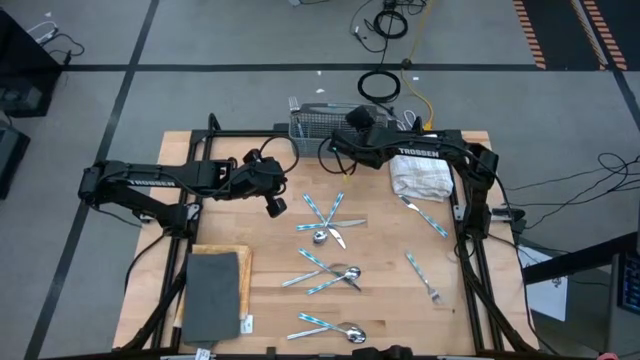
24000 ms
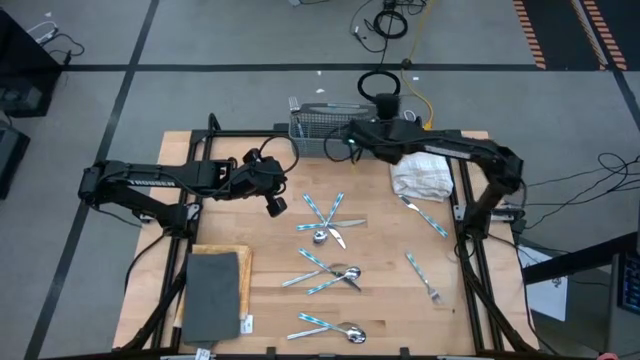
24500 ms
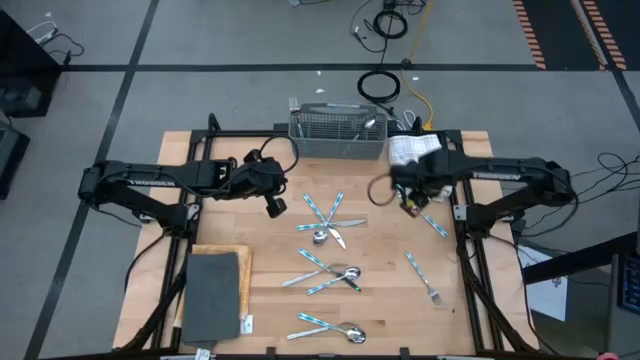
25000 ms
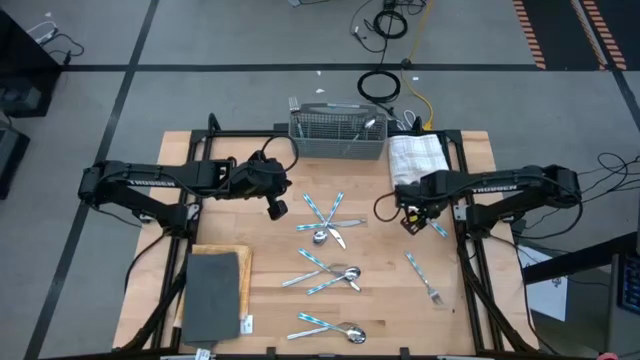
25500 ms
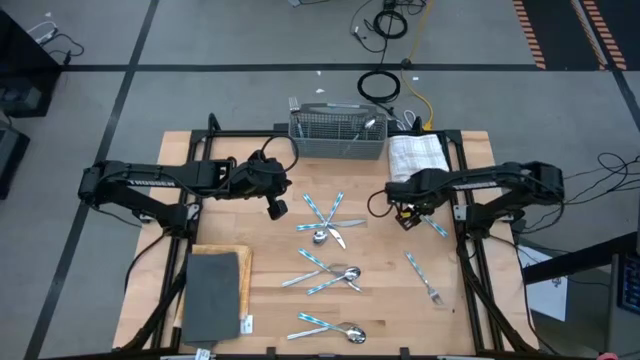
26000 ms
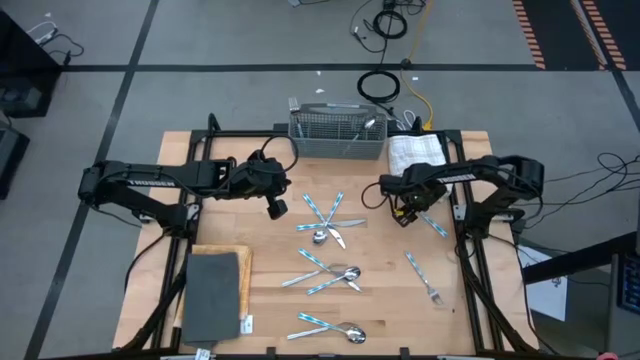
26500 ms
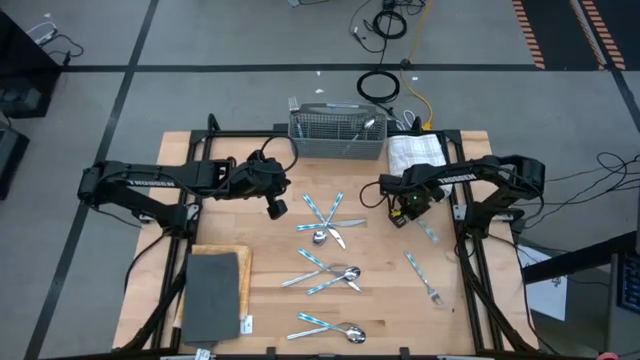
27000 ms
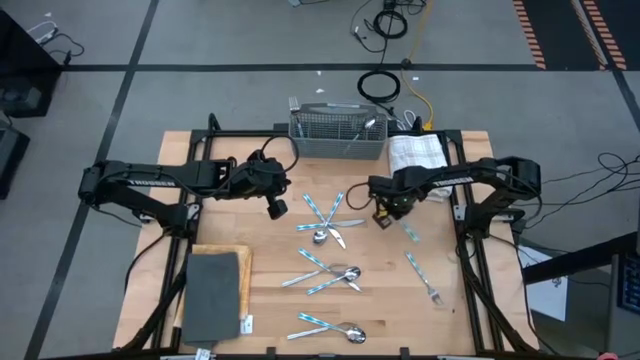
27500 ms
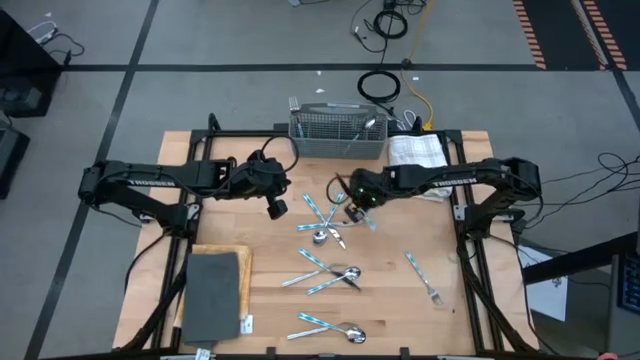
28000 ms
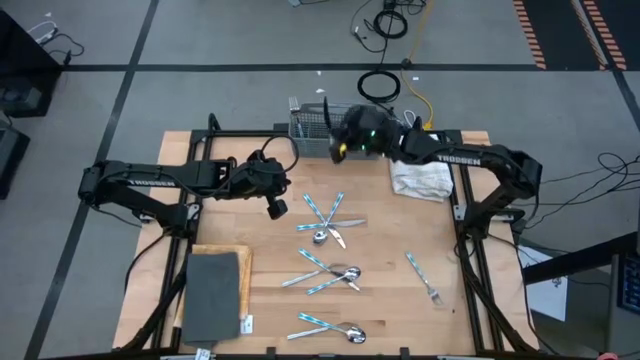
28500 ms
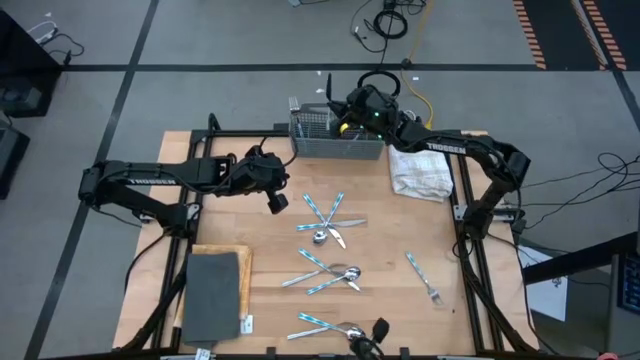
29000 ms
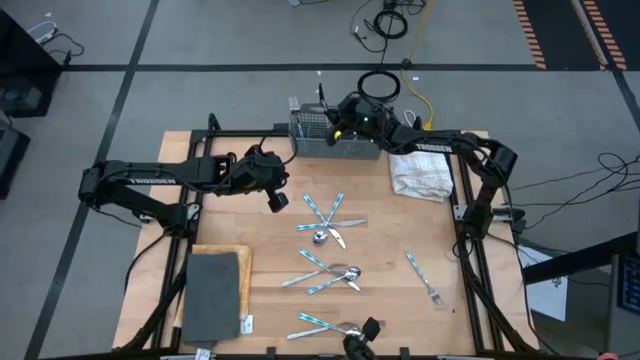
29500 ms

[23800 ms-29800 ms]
Task: Sort silverware
Put the knife into the silverware basket

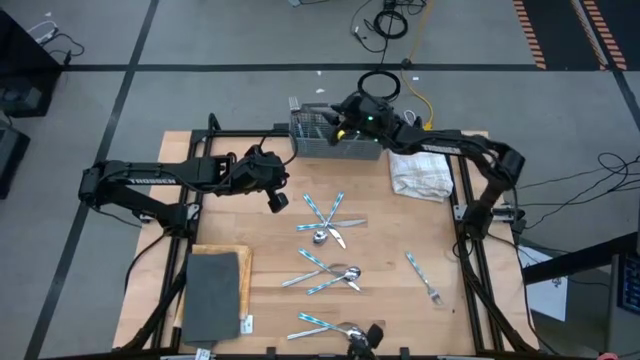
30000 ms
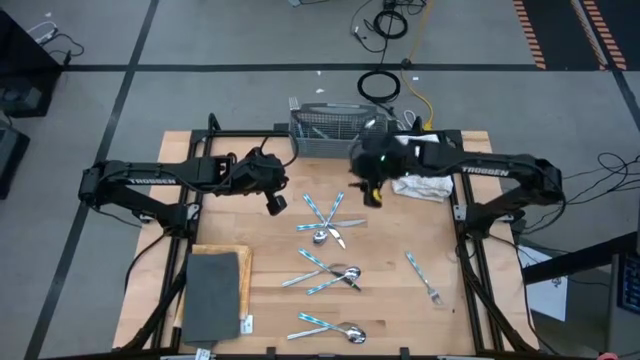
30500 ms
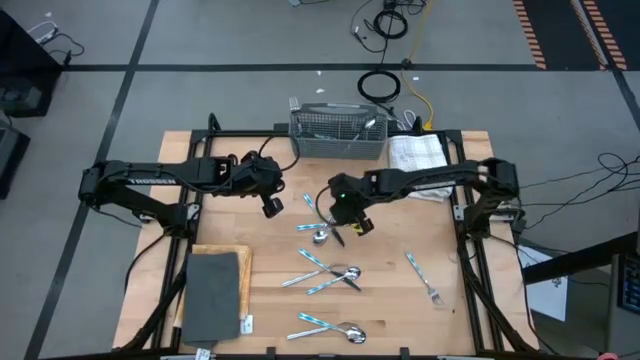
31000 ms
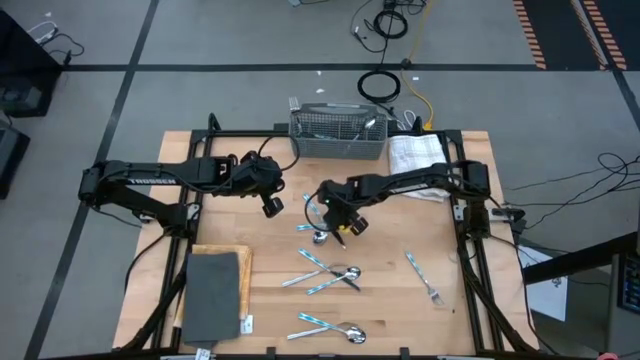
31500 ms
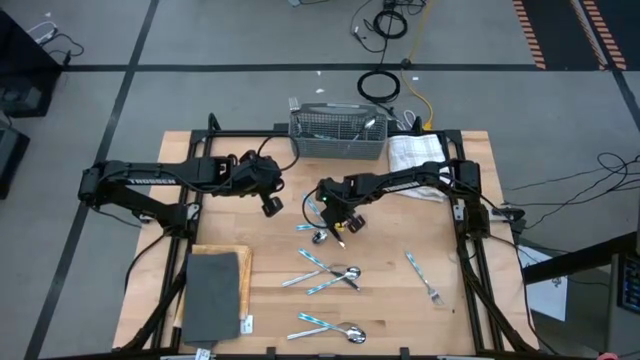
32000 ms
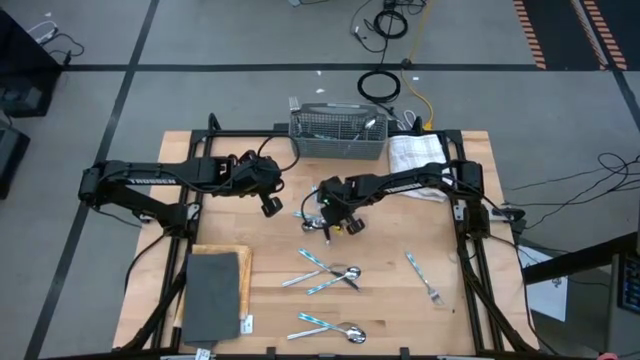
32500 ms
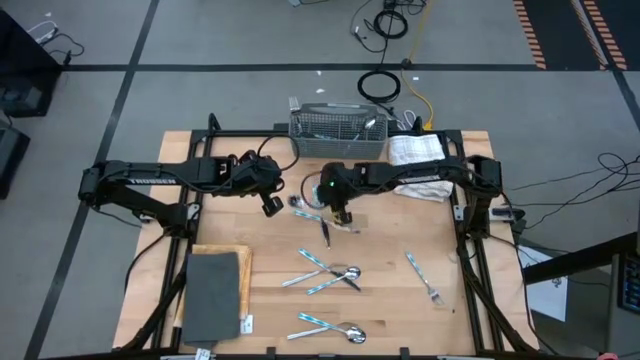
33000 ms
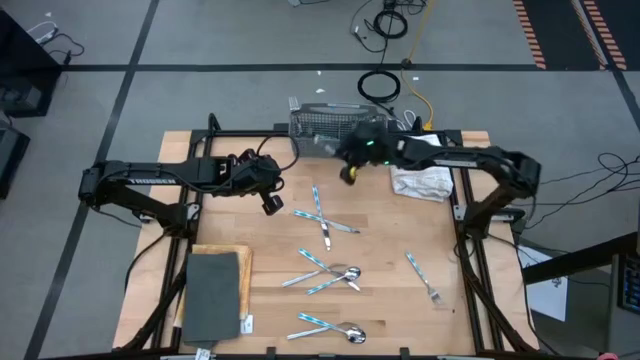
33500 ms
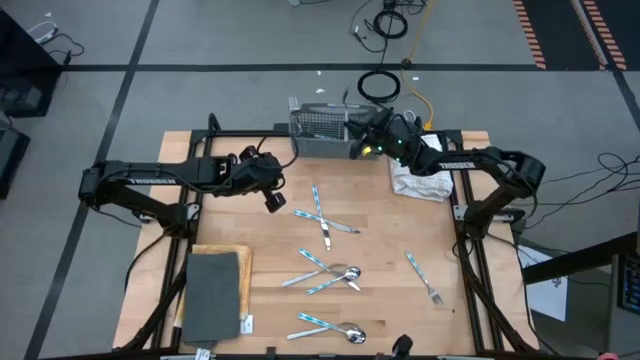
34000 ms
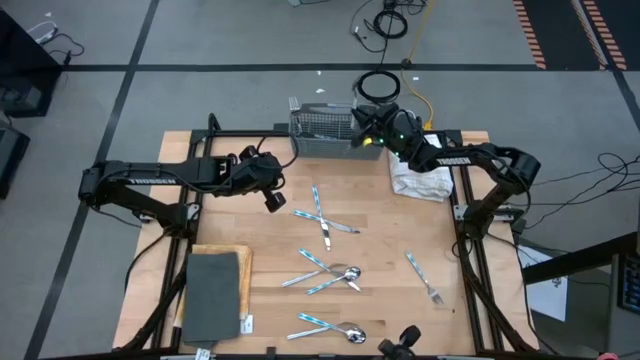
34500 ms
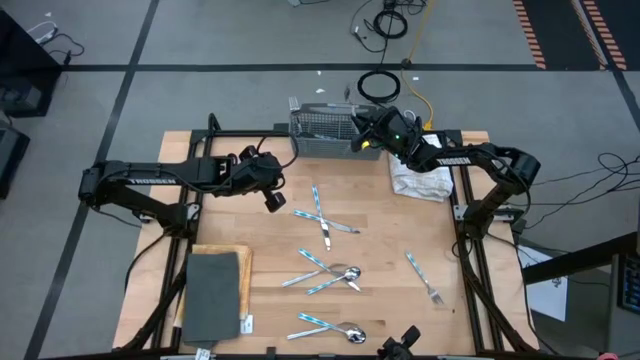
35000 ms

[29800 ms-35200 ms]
Put the spoon into the silverware basket

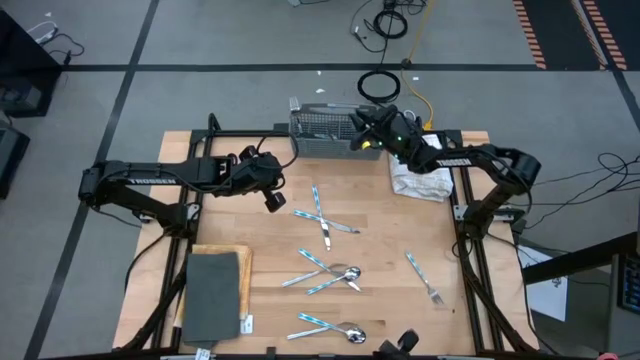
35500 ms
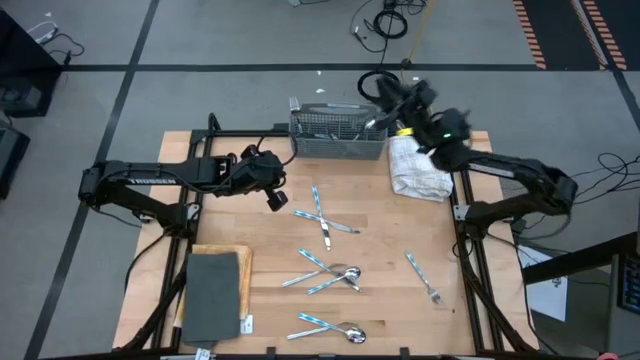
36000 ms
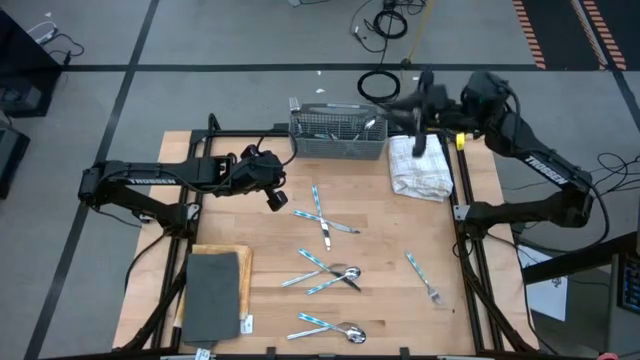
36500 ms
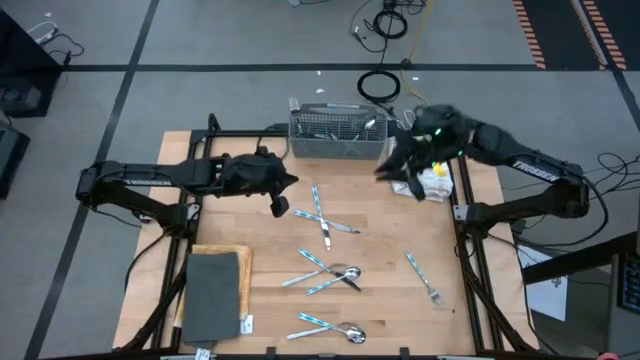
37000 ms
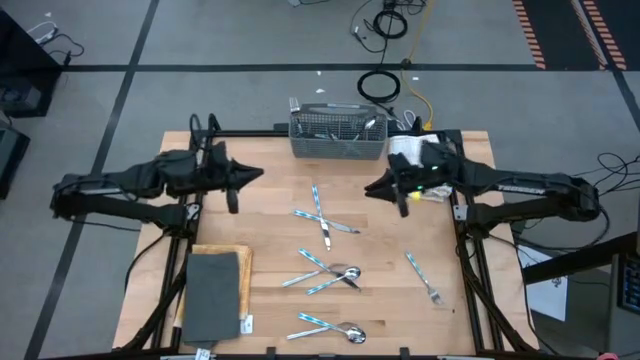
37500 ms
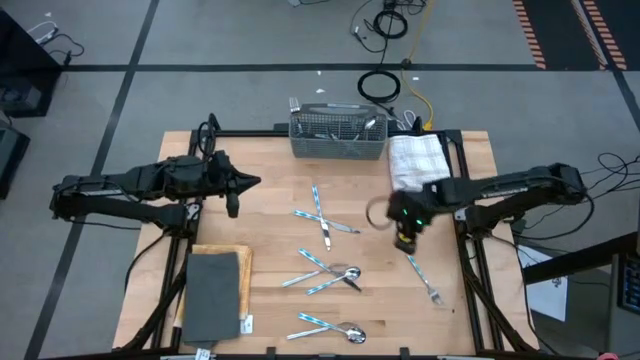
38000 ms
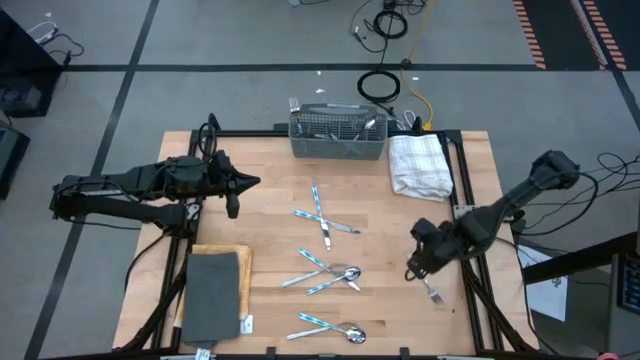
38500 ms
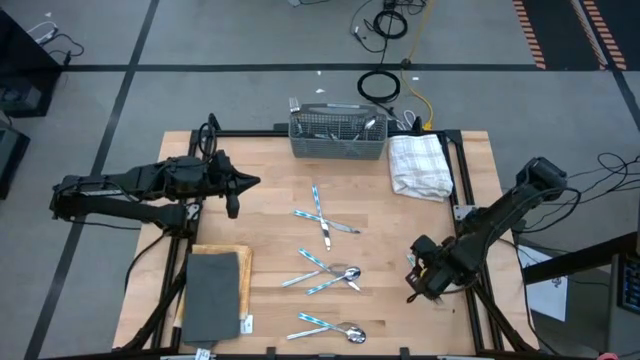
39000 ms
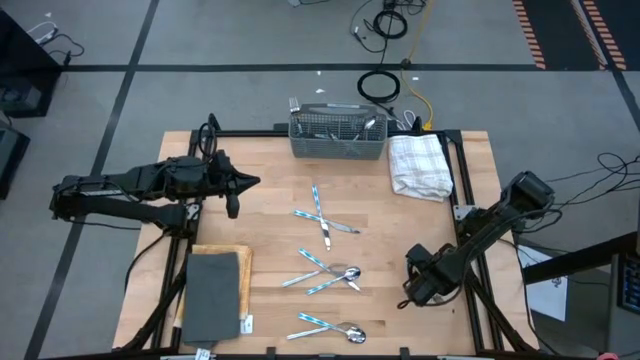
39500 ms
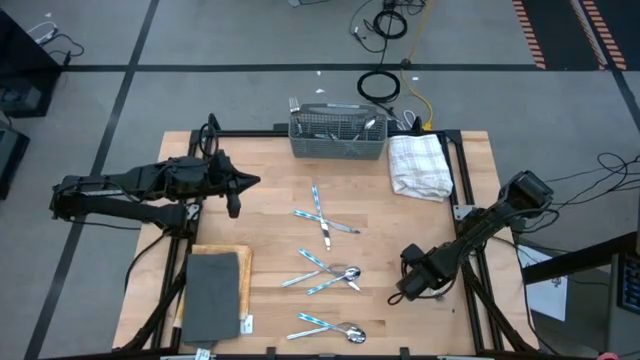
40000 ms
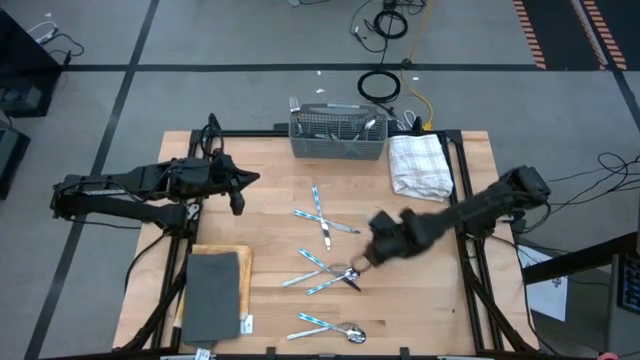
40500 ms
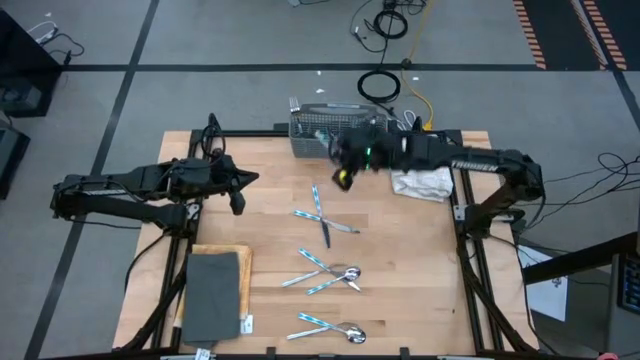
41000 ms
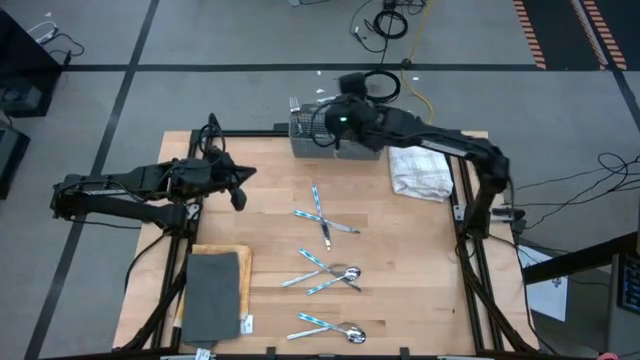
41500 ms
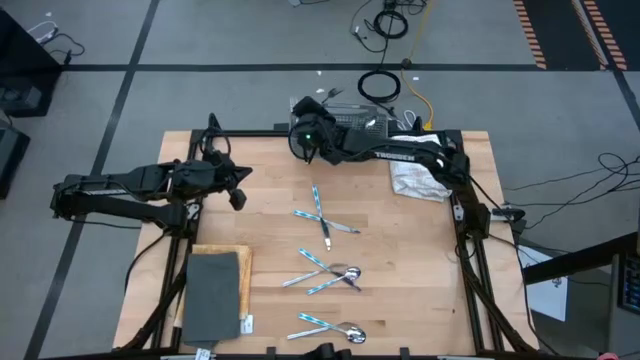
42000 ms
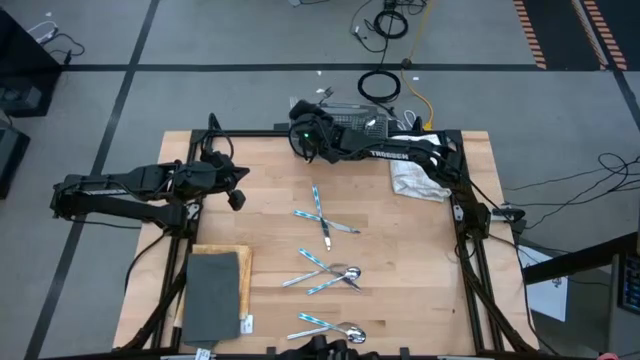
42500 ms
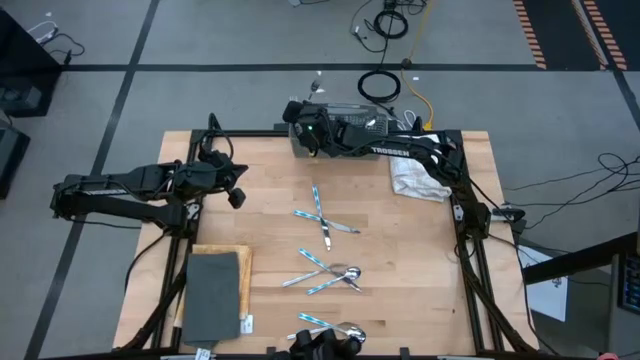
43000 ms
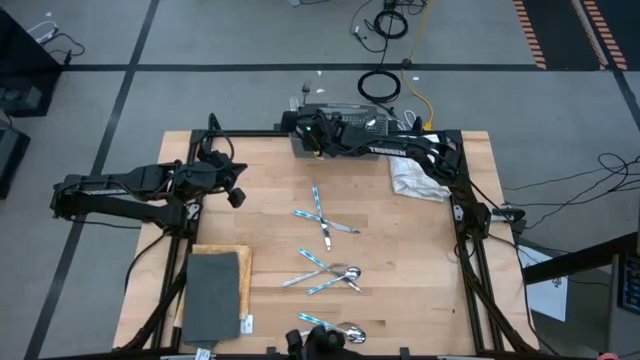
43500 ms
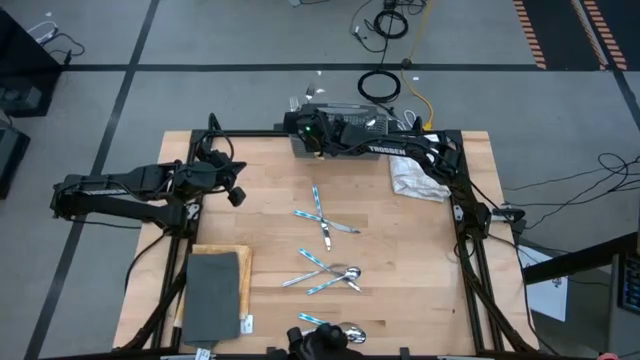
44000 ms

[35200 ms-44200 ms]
Put the fork into the silverware basket
